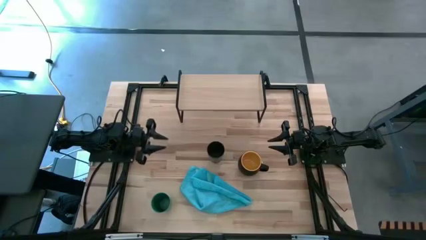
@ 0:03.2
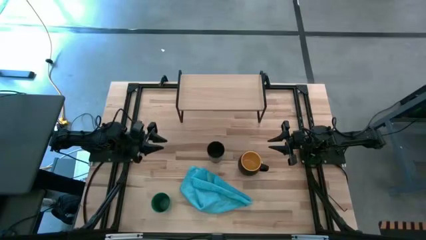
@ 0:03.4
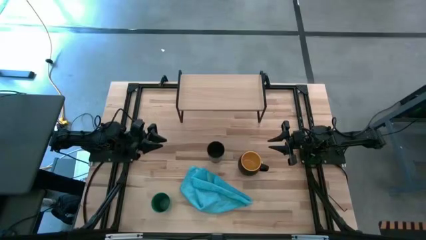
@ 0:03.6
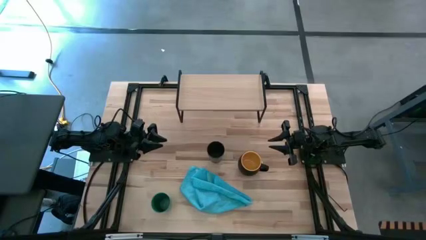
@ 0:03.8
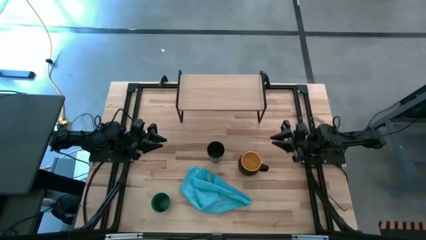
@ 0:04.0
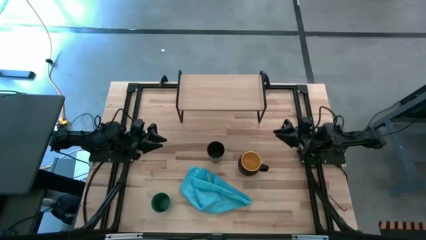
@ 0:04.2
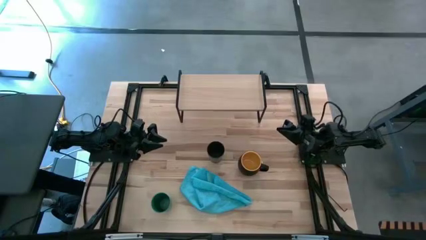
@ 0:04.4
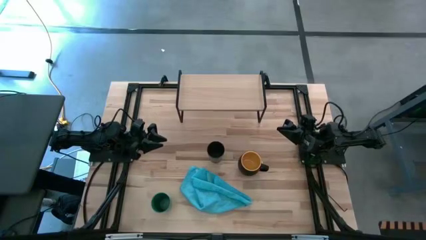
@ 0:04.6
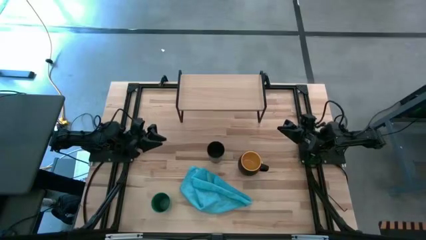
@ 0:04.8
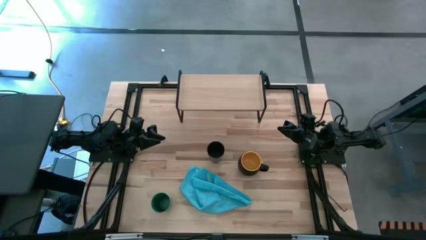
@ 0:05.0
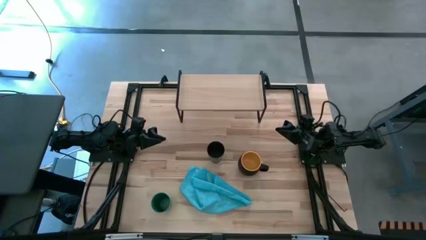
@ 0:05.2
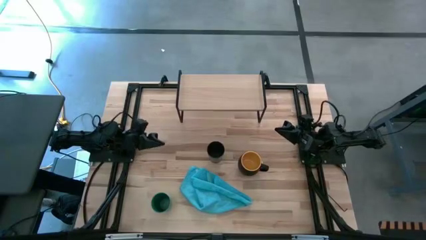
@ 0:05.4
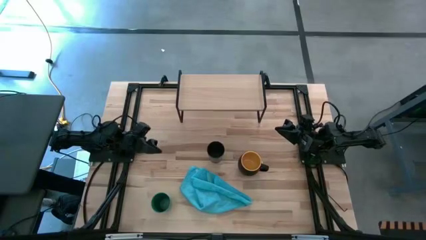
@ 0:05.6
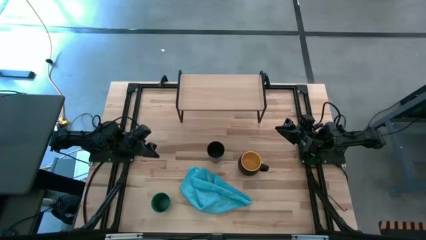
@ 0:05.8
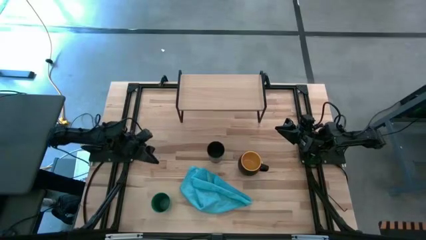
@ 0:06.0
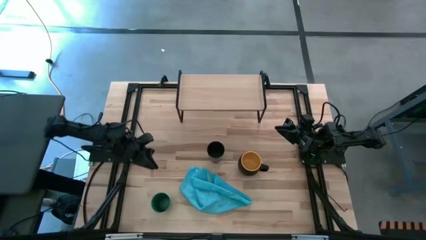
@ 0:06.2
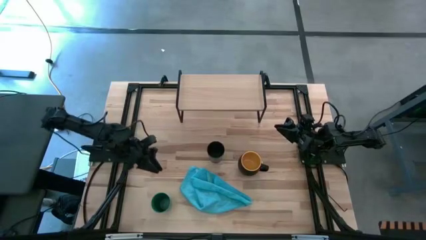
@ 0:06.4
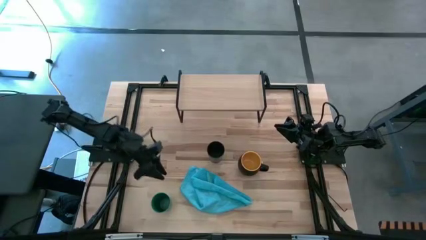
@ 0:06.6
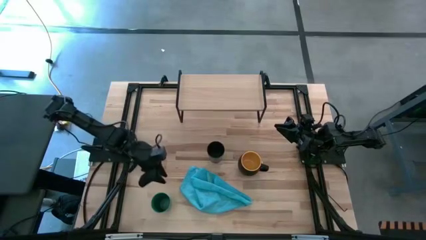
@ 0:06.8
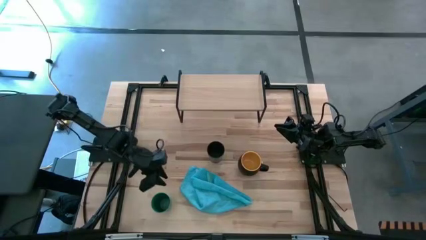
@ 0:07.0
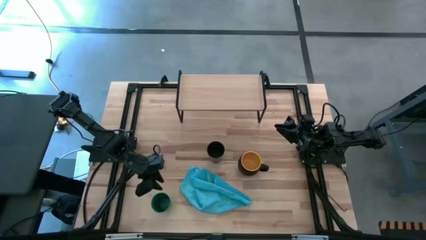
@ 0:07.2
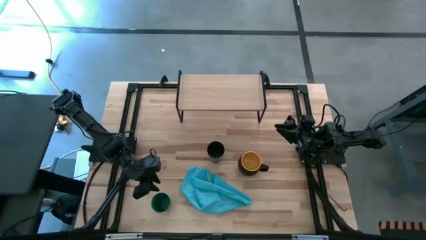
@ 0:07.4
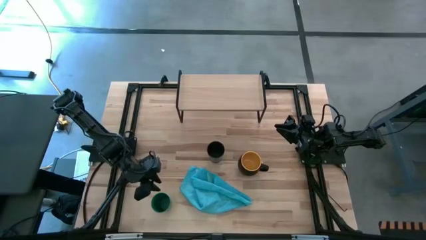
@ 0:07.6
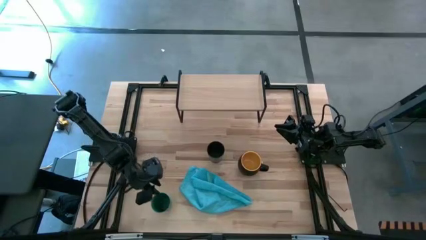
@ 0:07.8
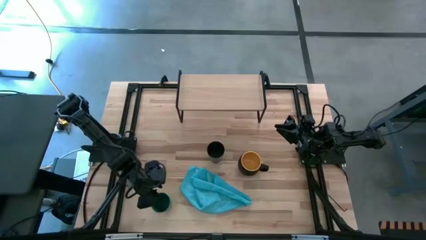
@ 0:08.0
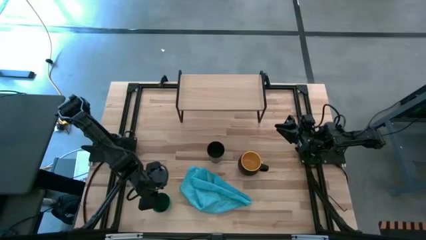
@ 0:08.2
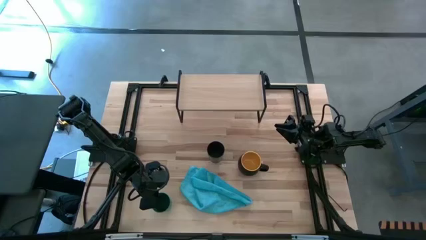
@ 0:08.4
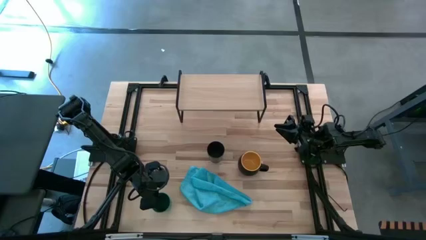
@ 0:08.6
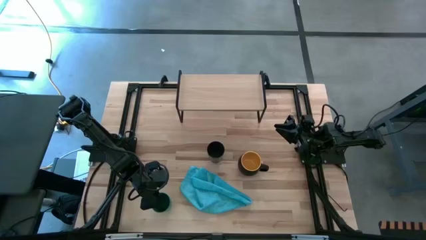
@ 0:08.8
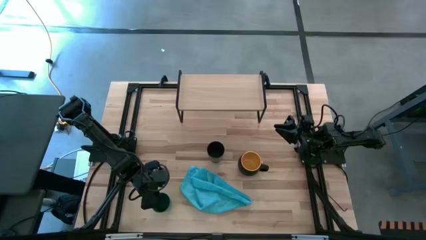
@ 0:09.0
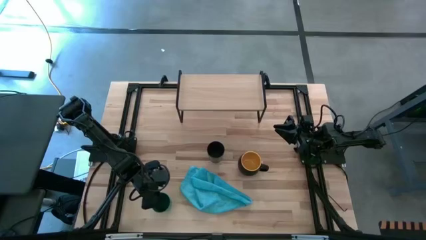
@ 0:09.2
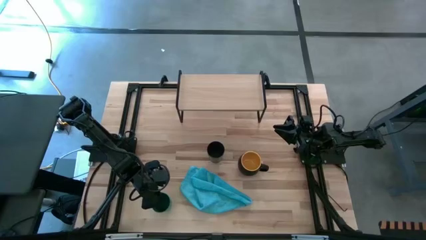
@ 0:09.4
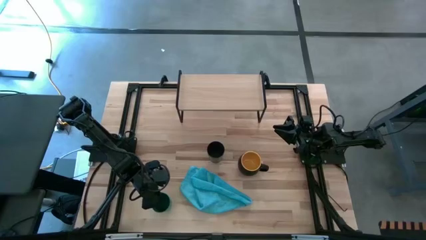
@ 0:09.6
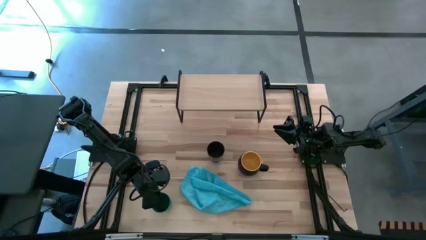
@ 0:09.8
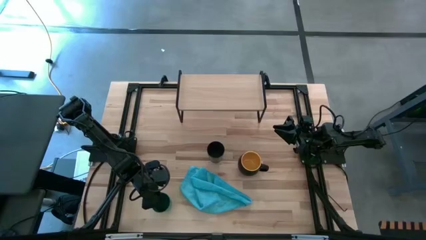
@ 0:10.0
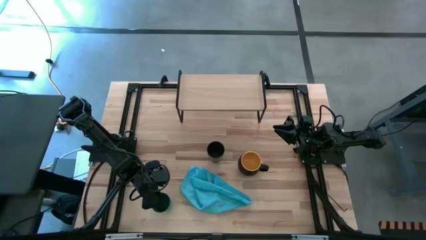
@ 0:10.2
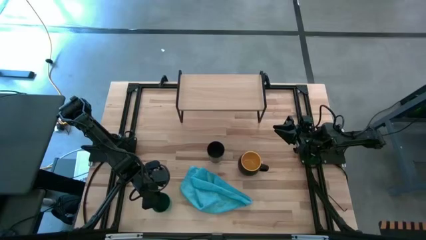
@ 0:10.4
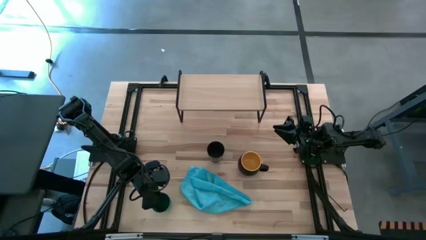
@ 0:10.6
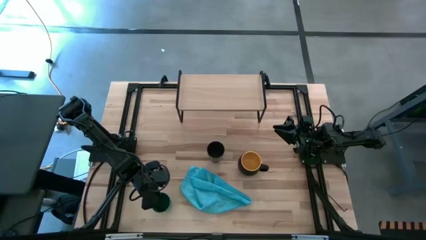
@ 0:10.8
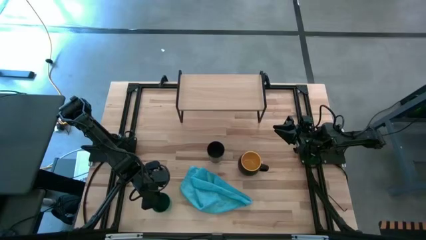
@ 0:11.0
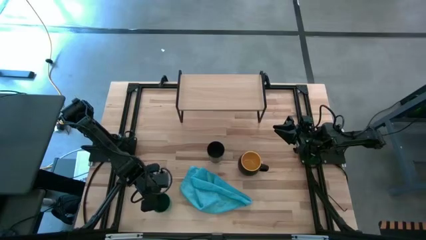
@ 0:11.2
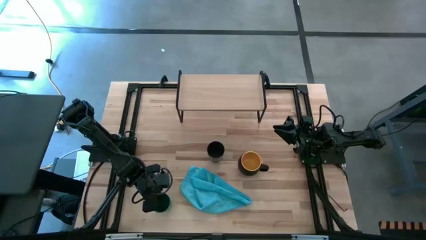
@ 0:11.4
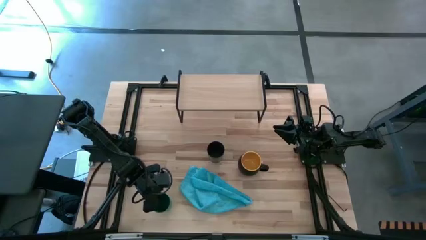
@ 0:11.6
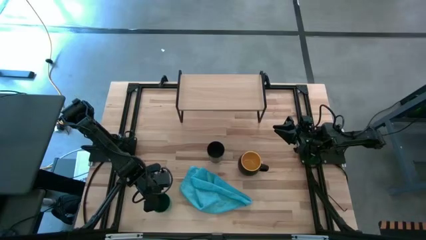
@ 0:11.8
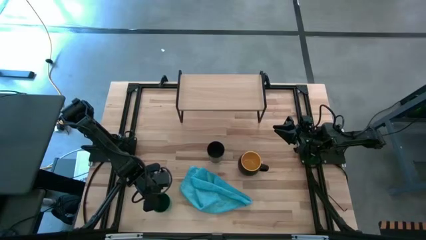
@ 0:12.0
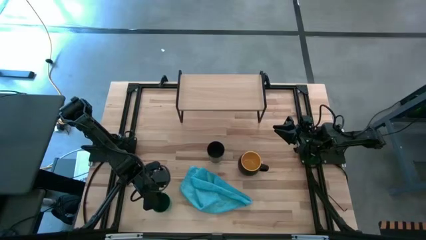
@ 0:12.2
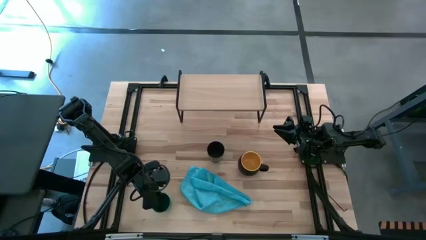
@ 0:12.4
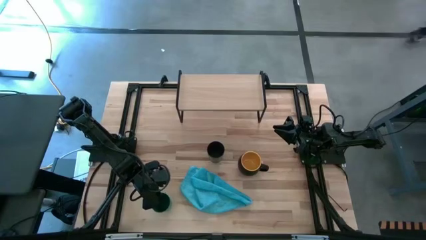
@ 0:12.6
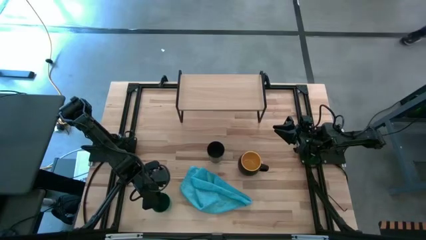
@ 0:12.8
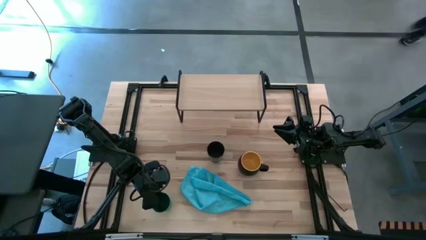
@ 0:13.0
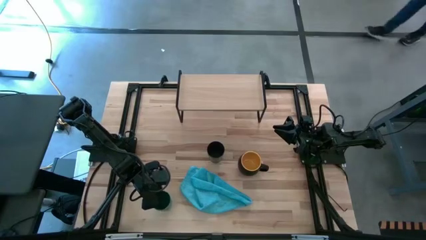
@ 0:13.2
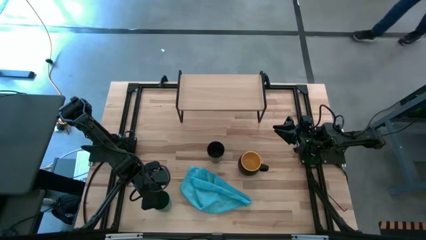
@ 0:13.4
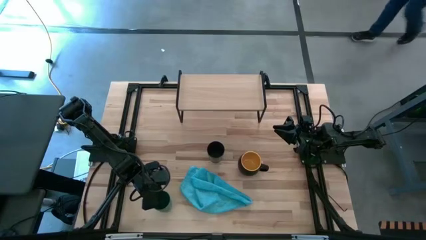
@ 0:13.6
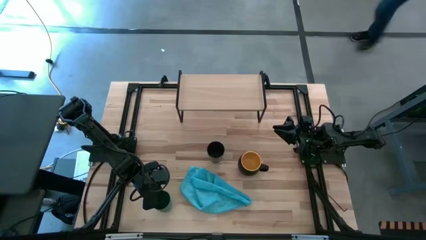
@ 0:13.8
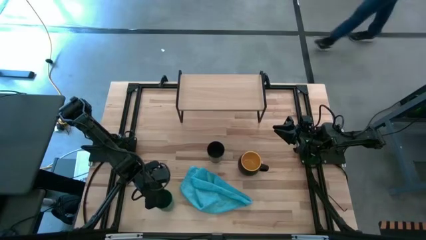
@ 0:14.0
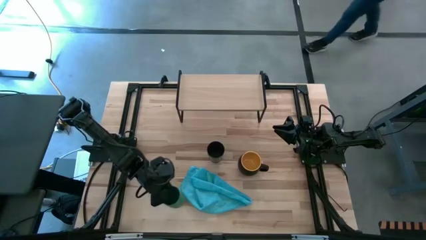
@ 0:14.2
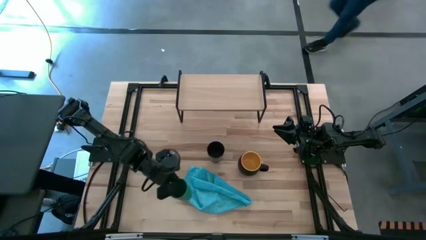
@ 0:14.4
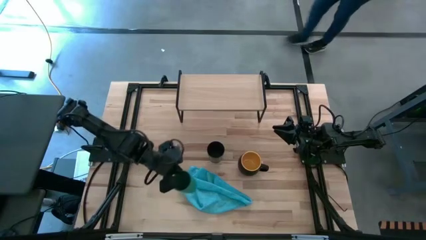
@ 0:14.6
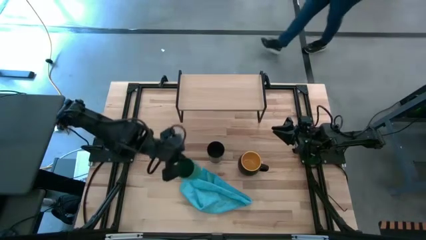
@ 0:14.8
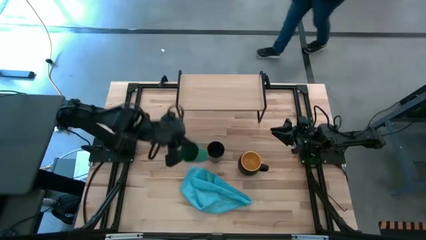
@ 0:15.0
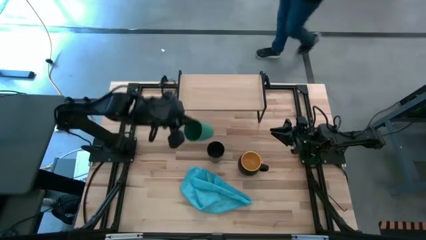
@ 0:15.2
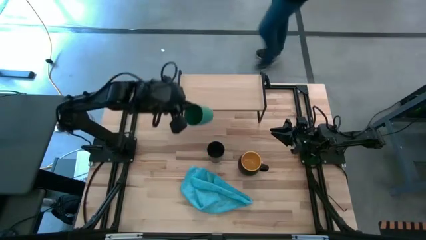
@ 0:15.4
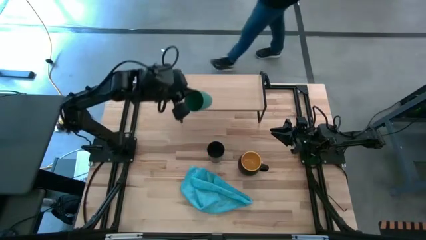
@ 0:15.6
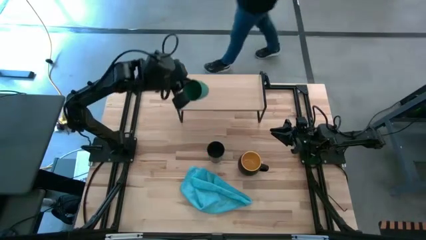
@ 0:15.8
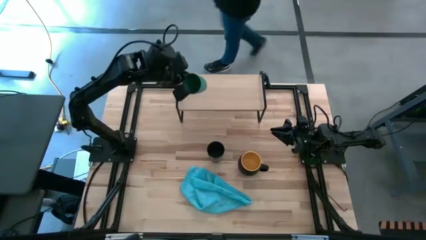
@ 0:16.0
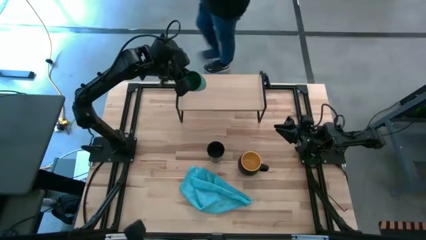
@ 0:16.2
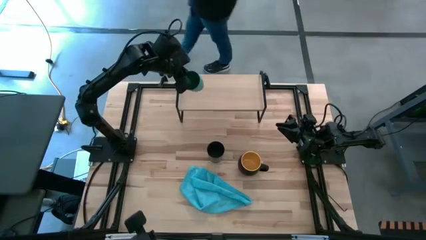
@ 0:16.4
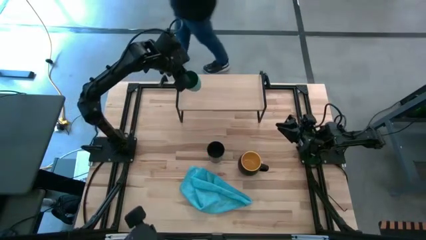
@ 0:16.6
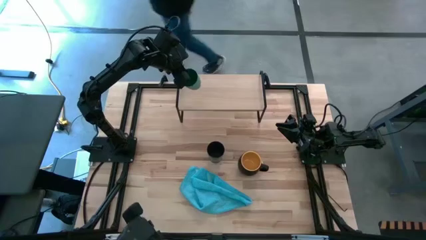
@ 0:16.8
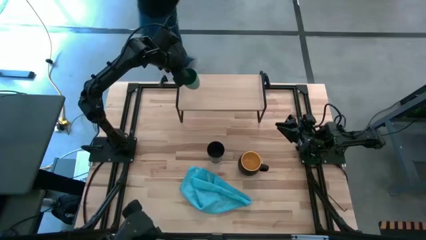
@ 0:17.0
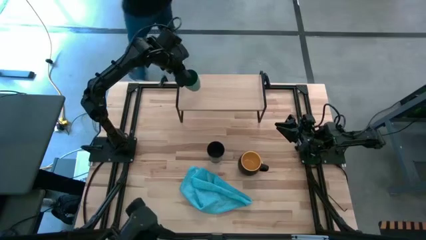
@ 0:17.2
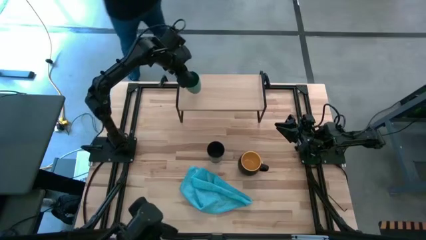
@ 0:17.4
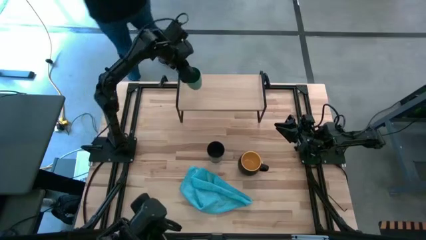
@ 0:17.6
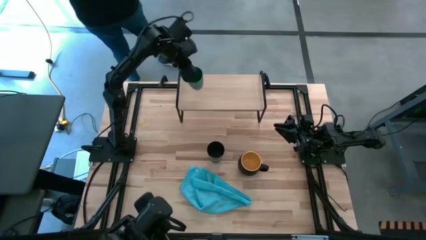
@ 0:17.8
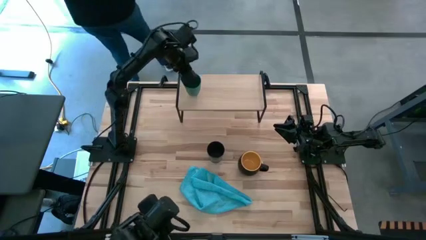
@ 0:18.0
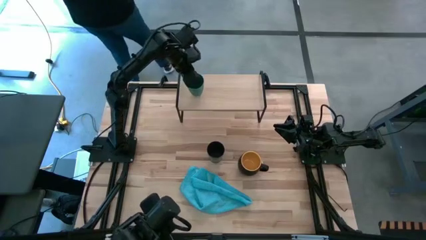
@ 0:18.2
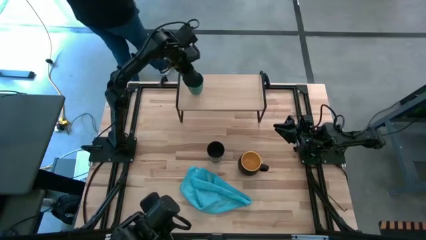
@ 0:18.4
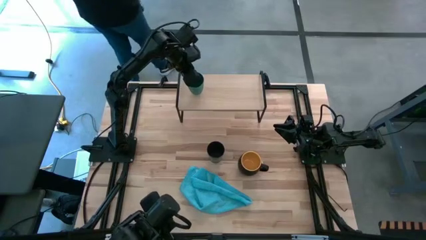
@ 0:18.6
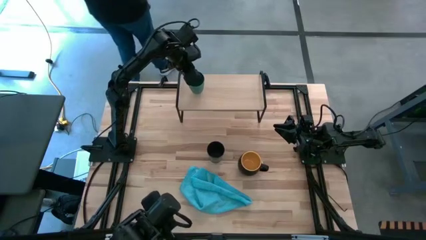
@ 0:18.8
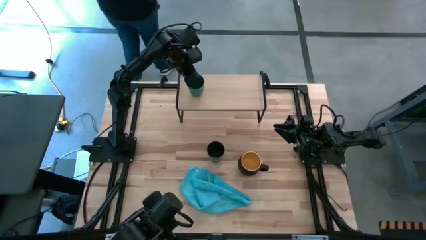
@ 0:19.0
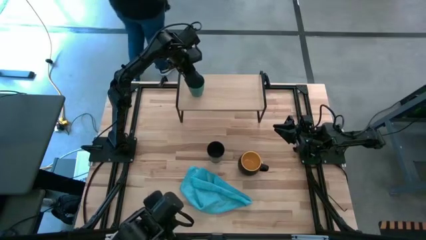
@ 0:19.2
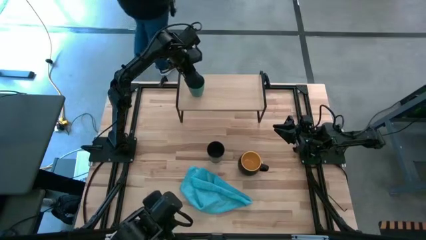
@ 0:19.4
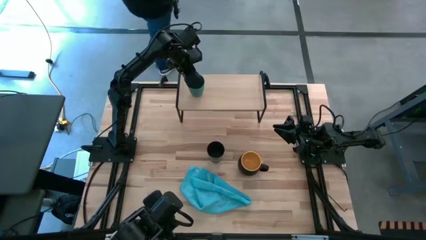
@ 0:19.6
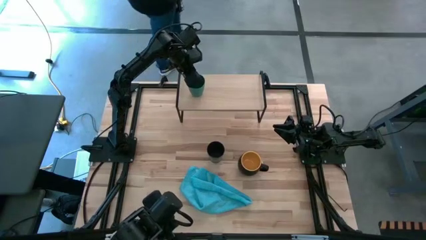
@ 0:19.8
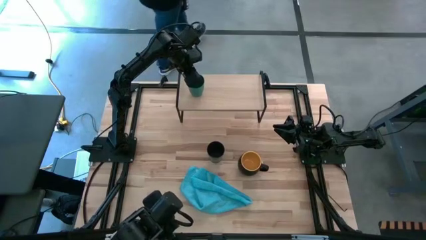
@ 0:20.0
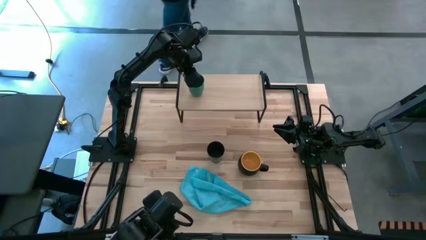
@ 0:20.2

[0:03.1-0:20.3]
Task: Stack small to large cups/mugs on shelf
Put the green cup on the shelf
